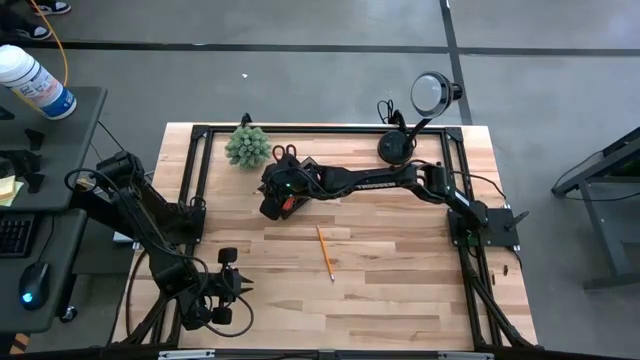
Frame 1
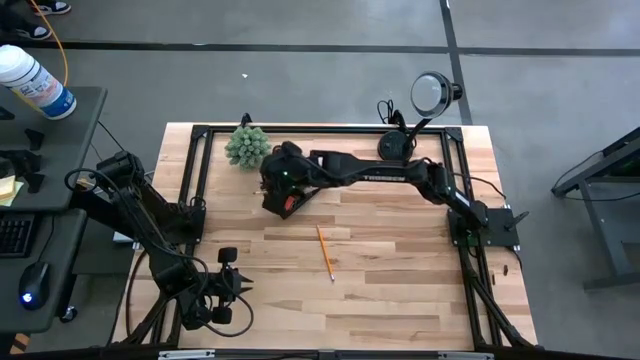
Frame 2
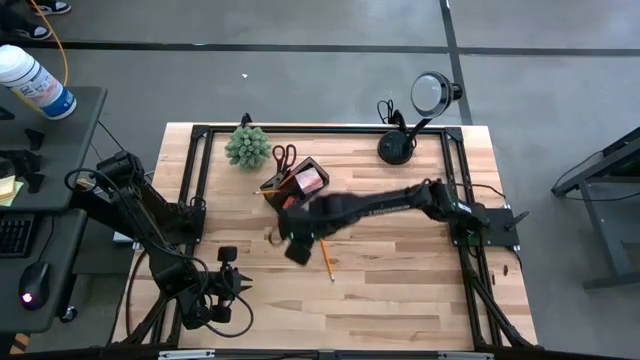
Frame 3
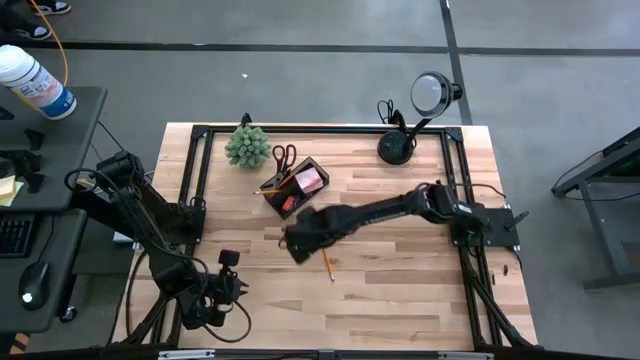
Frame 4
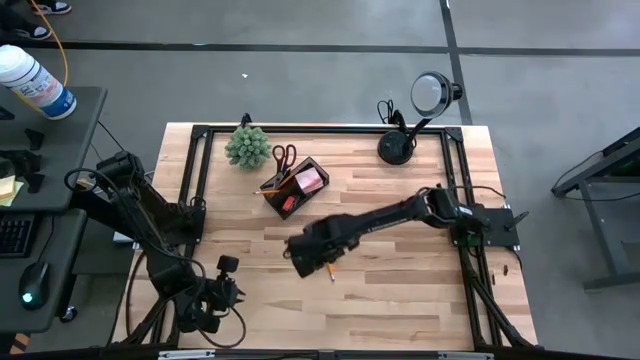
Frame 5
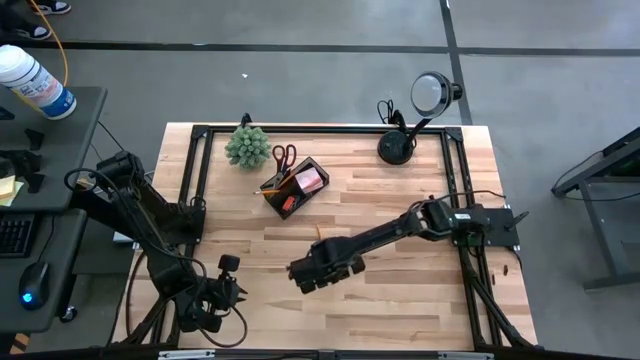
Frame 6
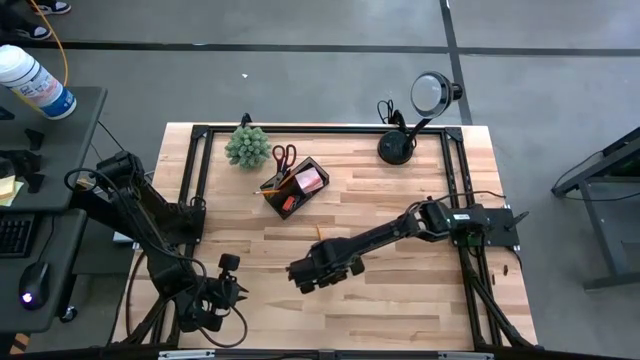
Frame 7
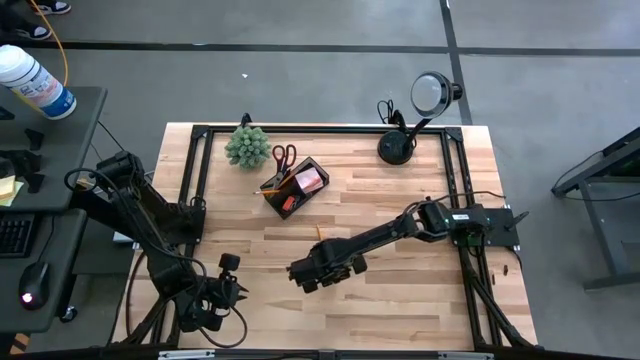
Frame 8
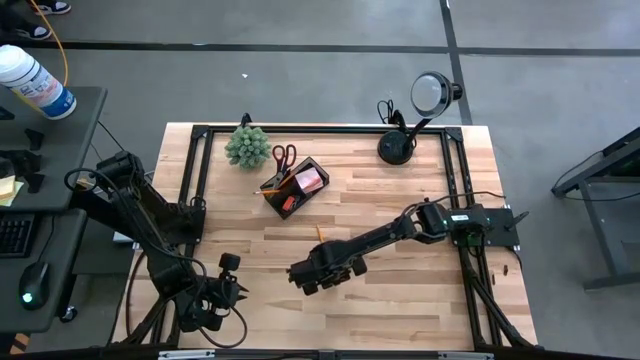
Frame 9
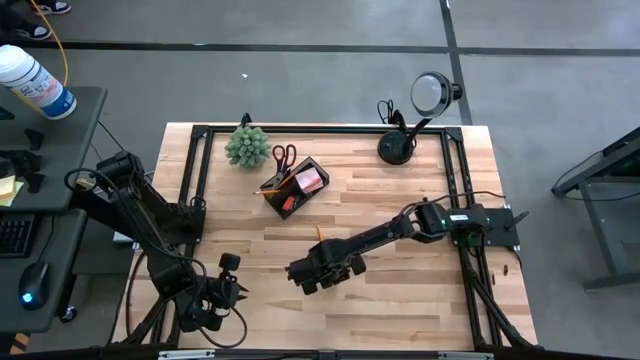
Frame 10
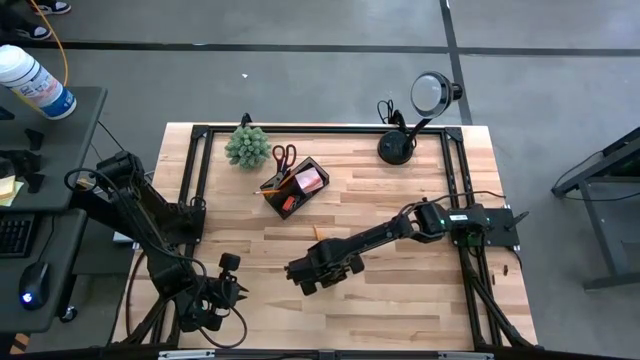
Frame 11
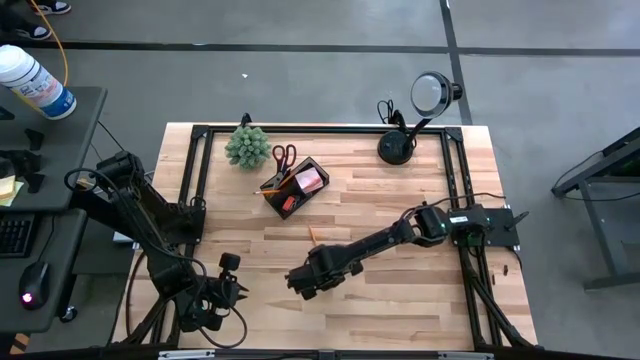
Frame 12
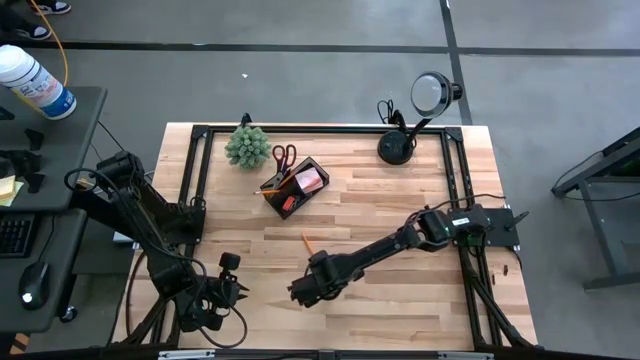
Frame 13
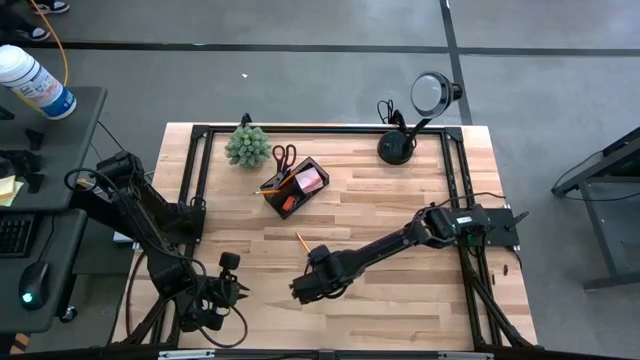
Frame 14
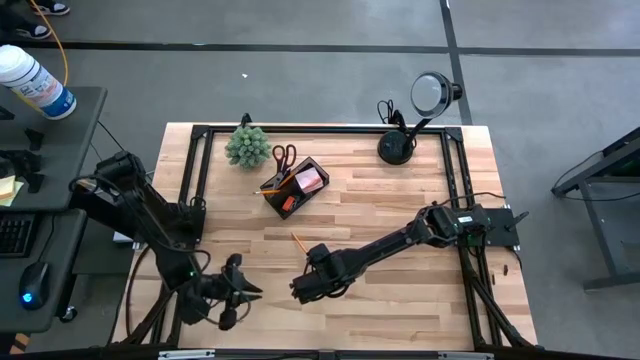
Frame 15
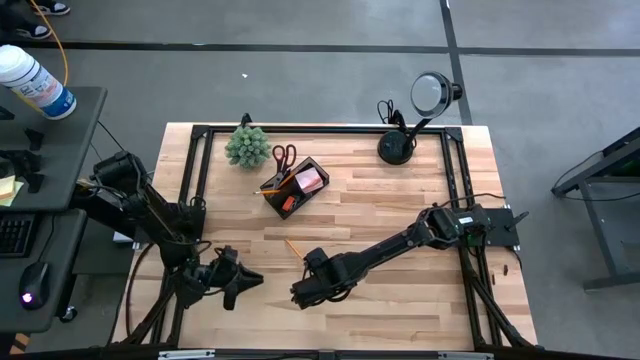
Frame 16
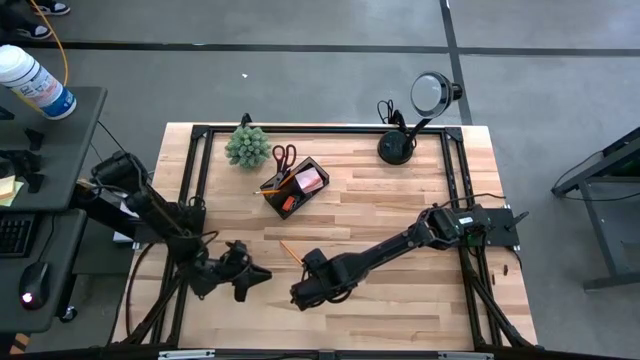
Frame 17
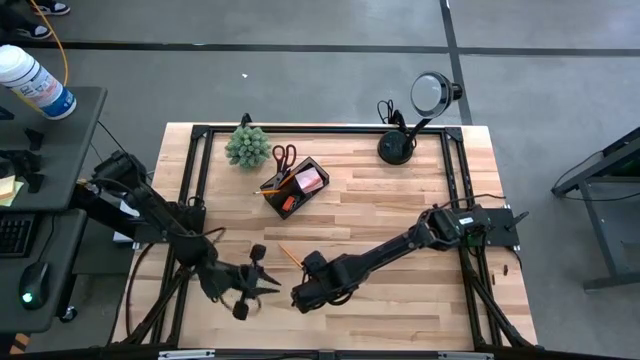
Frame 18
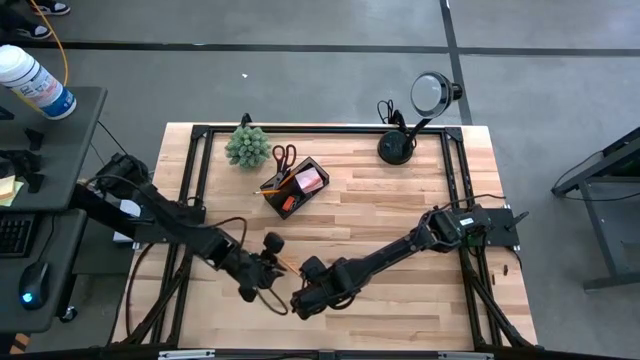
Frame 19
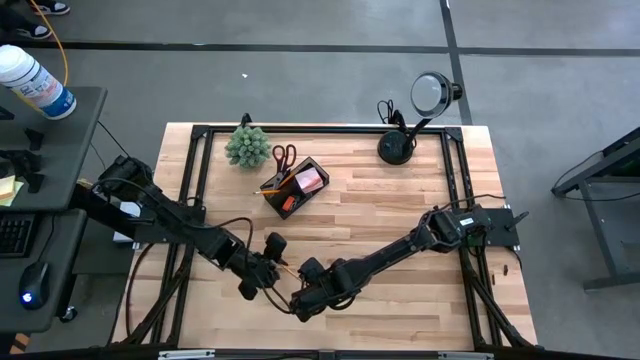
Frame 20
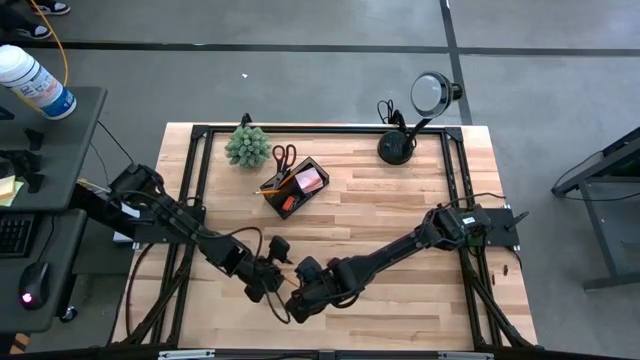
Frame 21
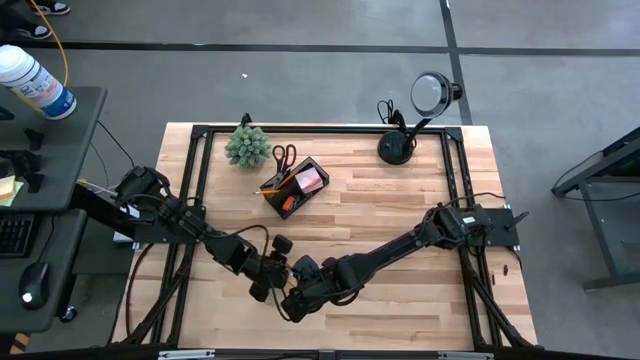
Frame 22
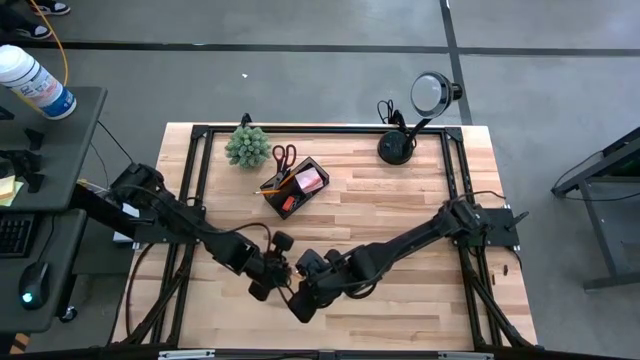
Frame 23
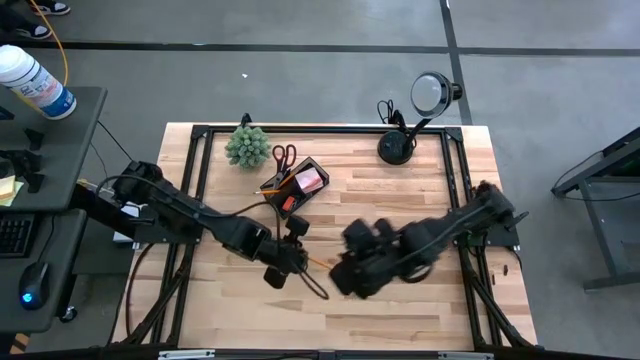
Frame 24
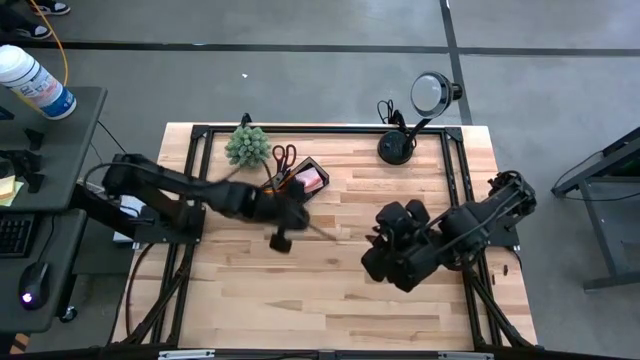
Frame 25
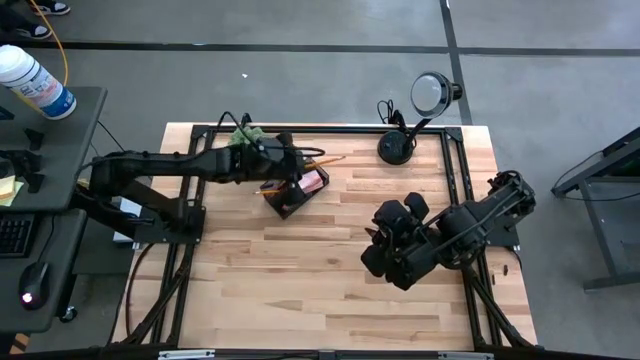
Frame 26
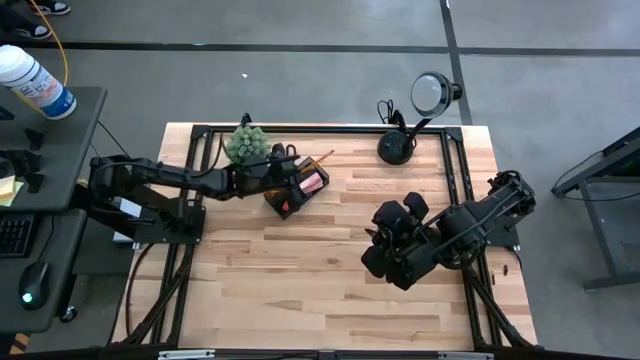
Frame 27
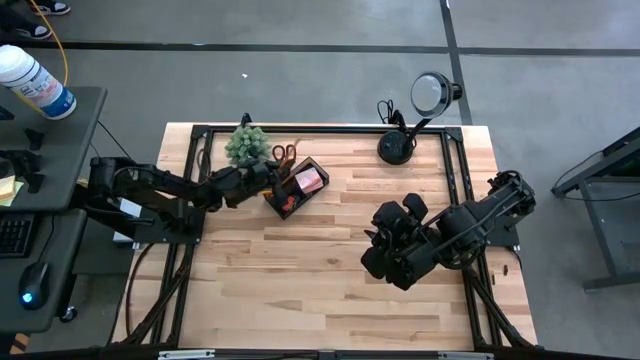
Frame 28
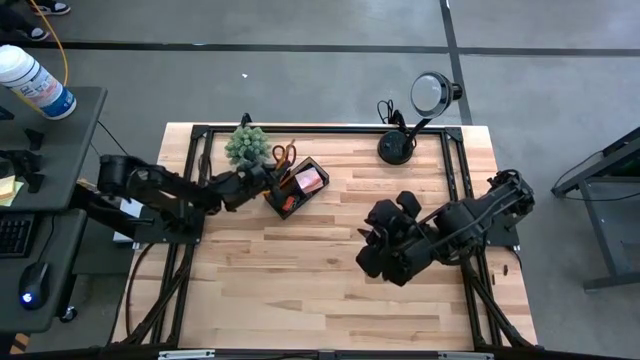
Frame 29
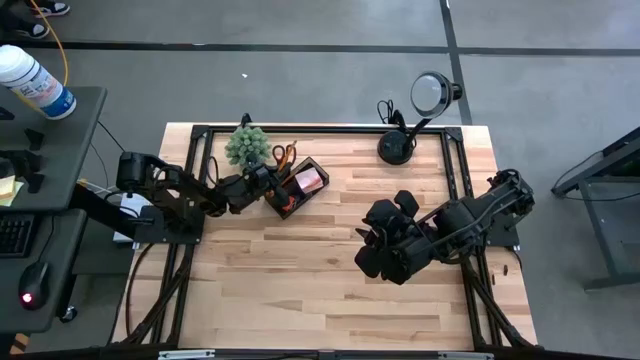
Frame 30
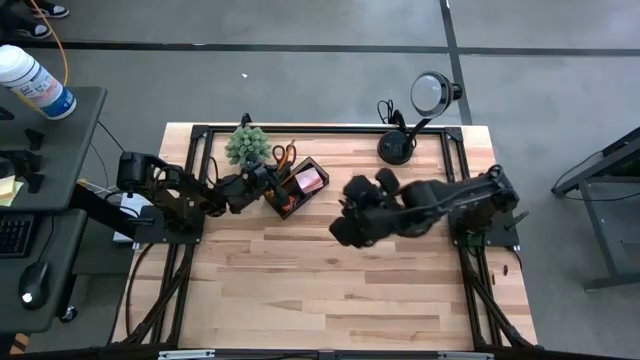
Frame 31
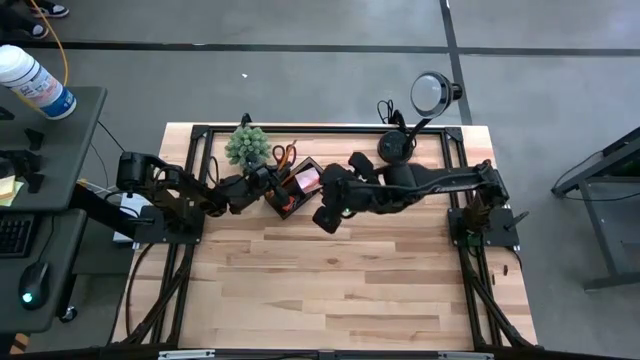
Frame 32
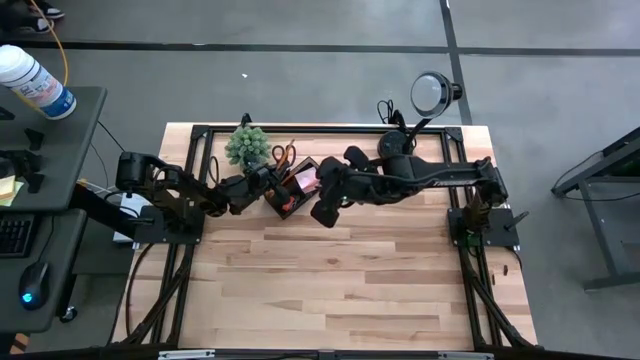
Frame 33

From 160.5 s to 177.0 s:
Task: Pick and place office supplies into organizer
Put the orange pencil into the black desk organizer

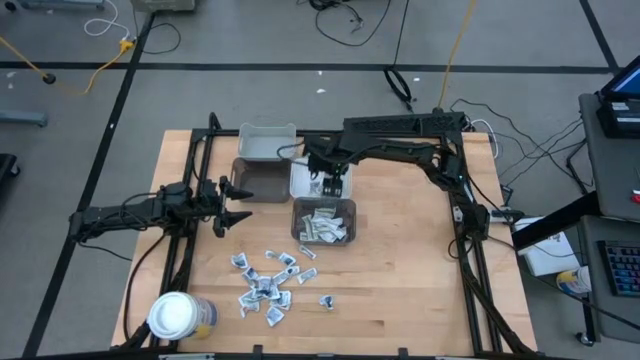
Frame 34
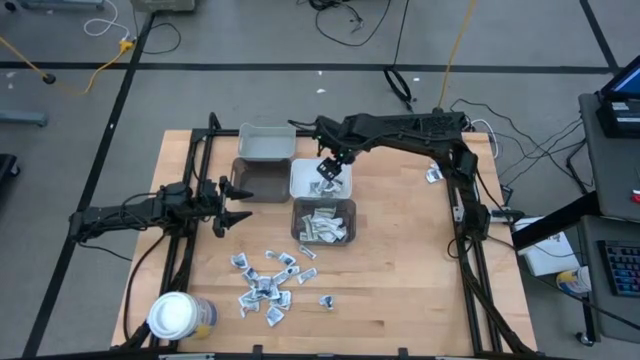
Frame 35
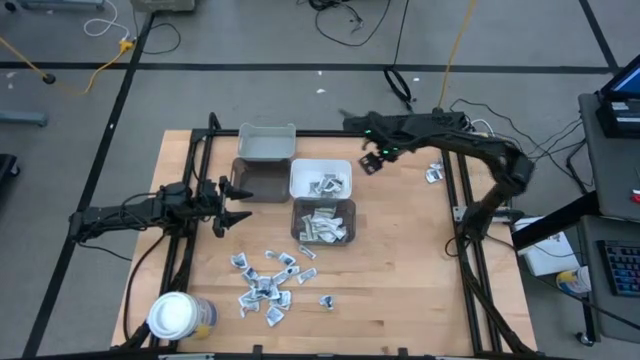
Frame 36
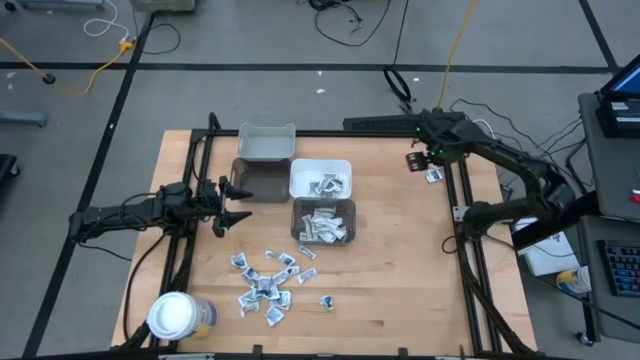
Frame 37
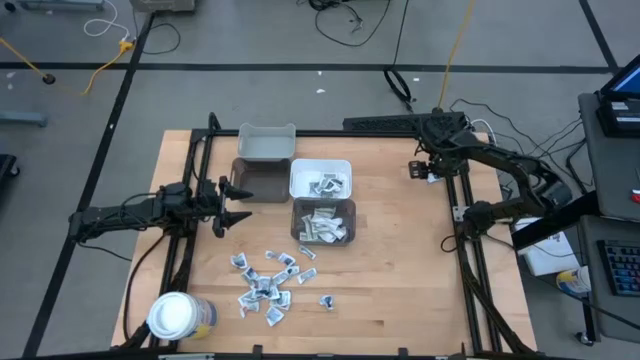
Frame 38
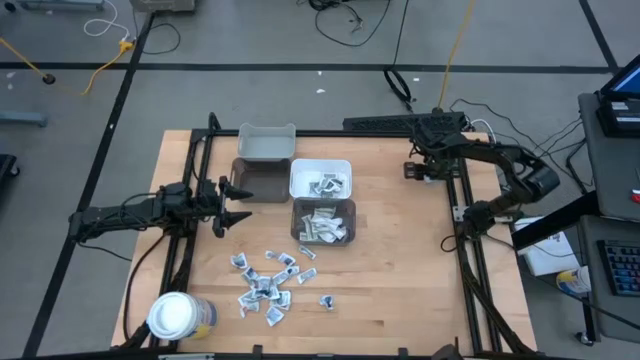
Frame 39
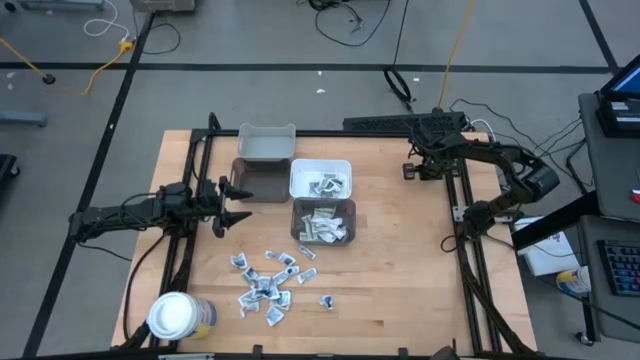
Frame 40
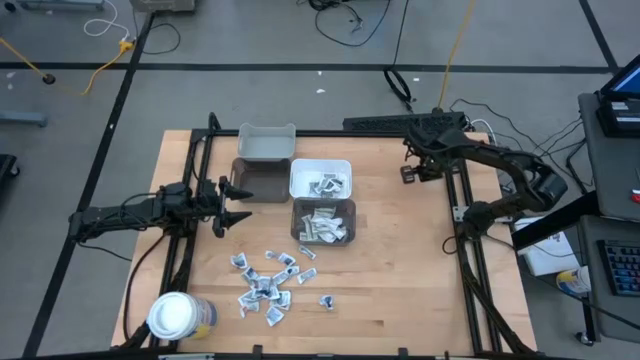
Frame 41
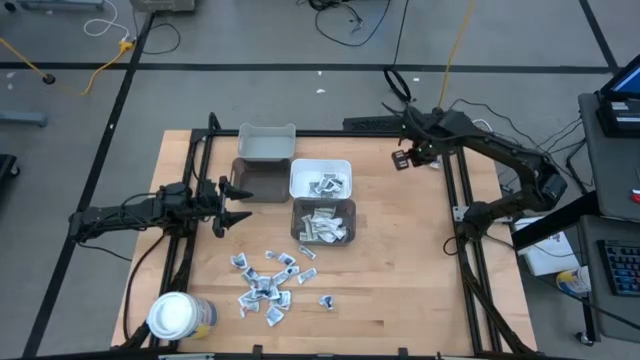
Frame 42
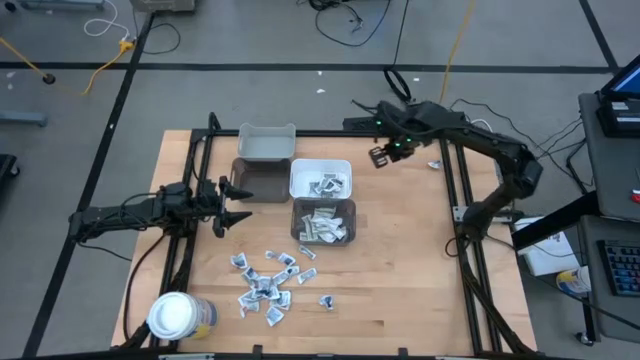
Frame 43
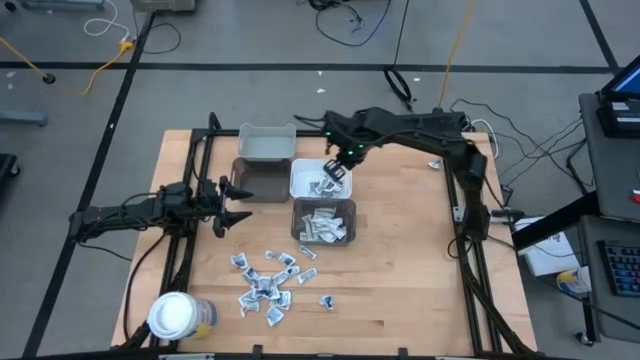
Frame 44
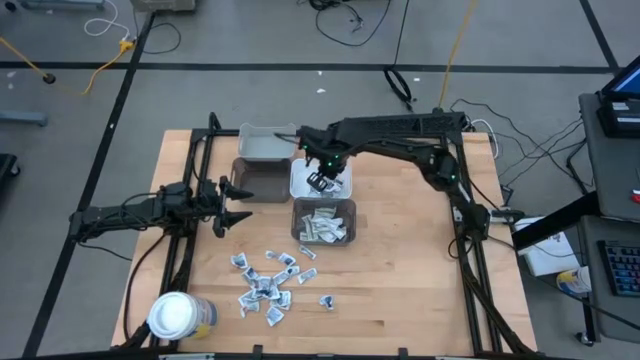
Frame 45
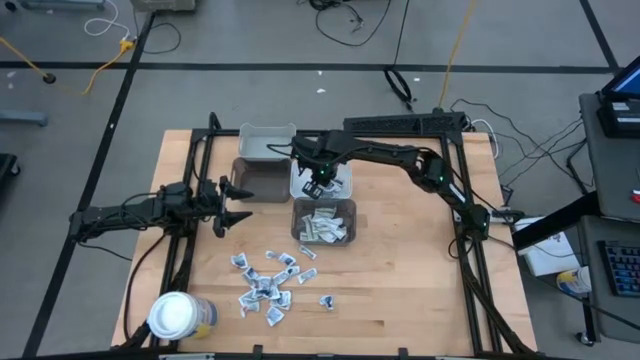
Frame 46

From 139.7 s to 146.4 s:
Task: Pick & Place First Aid Supplies
Put the gray towelette pack into the white bin
